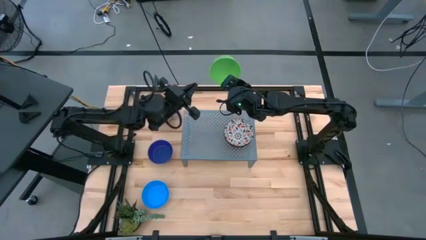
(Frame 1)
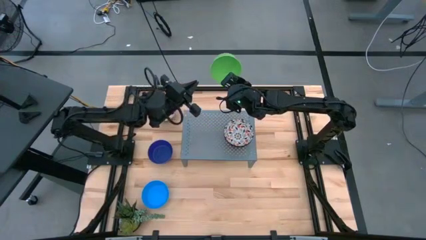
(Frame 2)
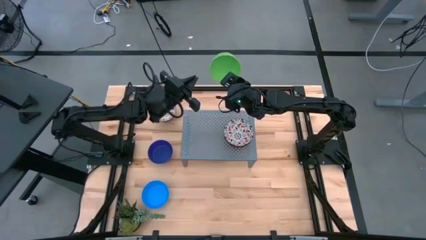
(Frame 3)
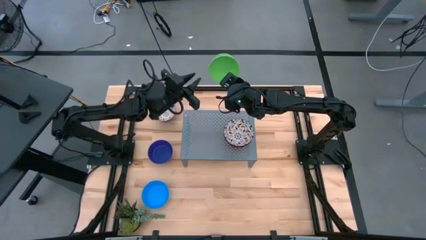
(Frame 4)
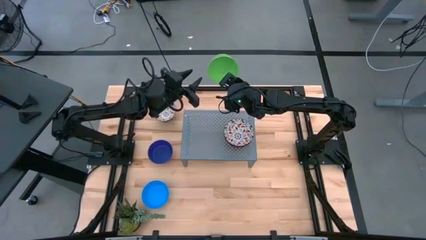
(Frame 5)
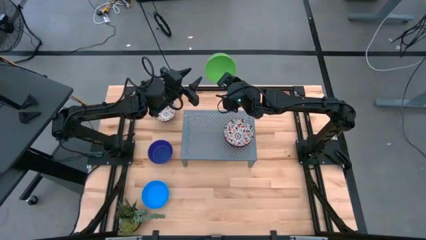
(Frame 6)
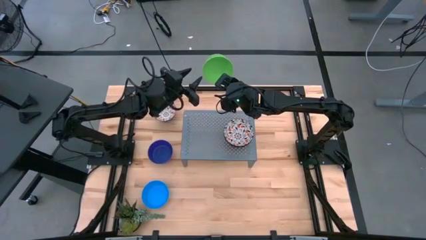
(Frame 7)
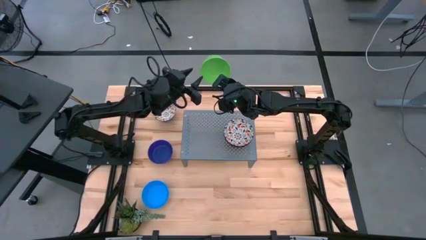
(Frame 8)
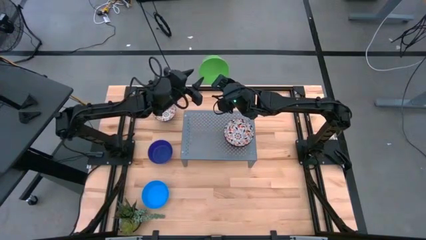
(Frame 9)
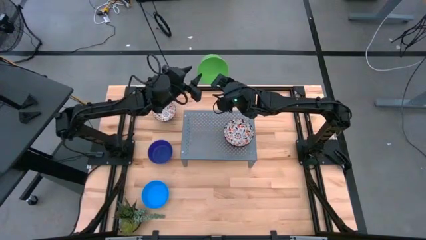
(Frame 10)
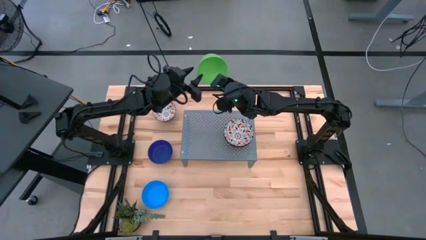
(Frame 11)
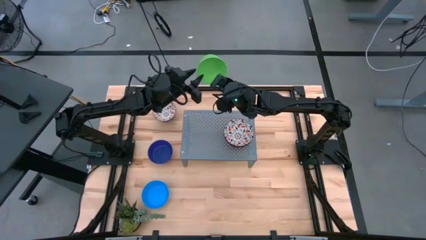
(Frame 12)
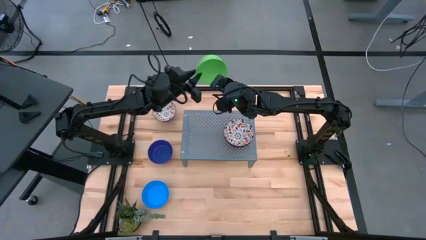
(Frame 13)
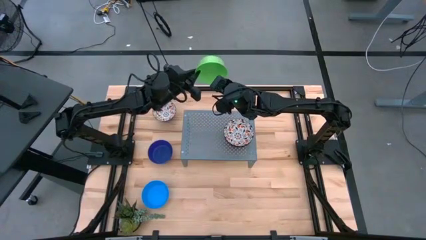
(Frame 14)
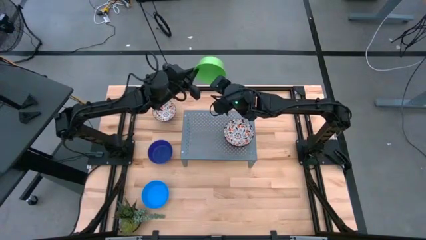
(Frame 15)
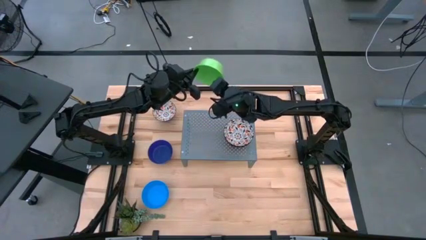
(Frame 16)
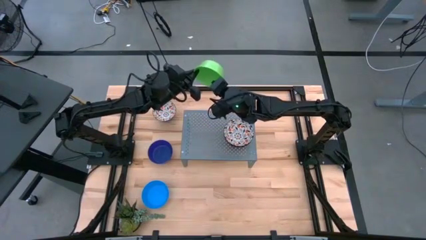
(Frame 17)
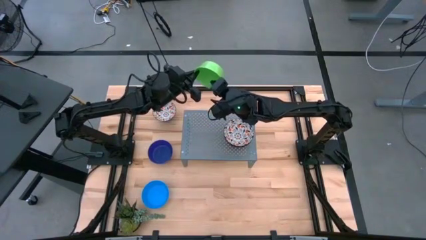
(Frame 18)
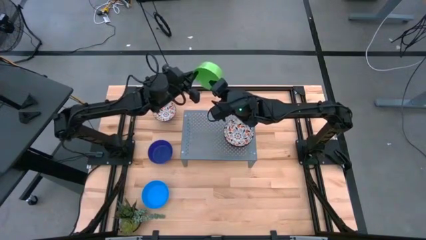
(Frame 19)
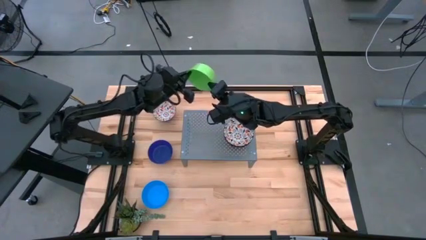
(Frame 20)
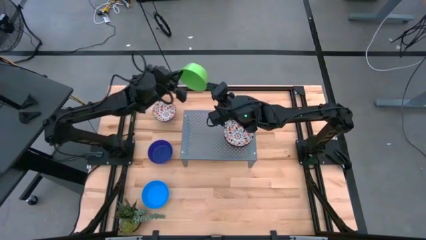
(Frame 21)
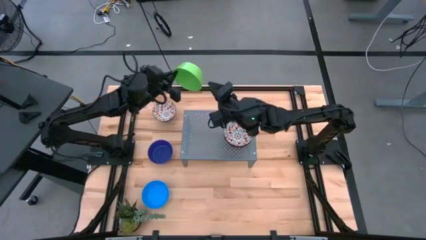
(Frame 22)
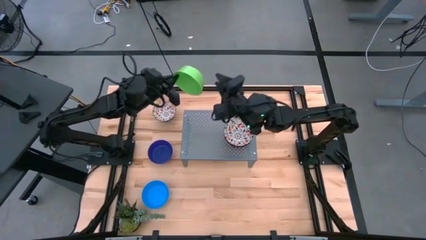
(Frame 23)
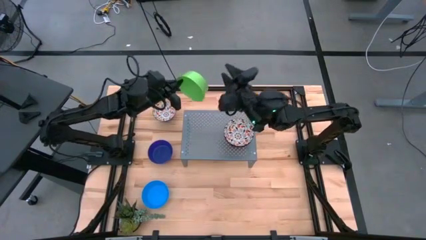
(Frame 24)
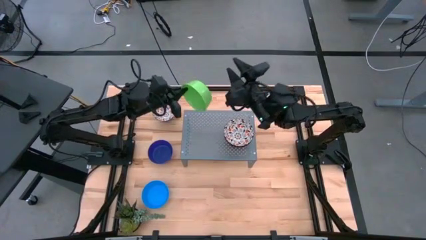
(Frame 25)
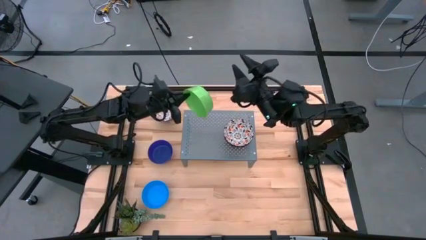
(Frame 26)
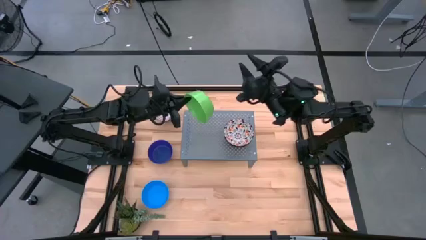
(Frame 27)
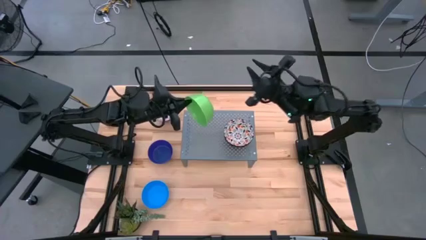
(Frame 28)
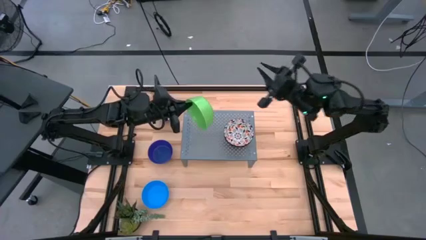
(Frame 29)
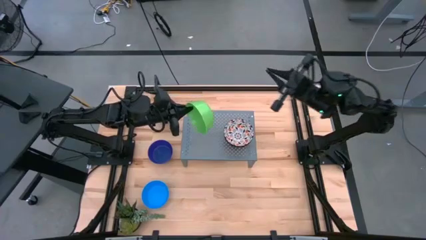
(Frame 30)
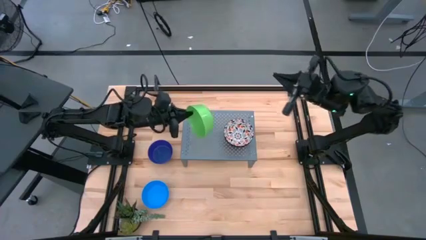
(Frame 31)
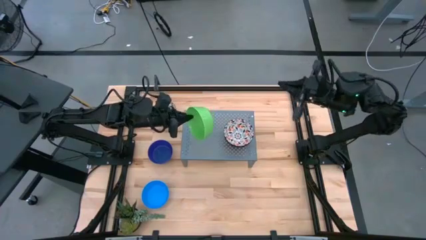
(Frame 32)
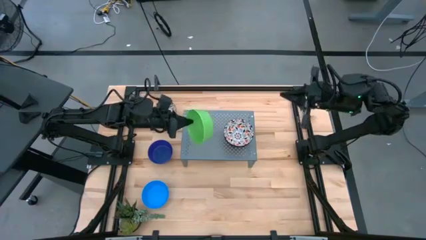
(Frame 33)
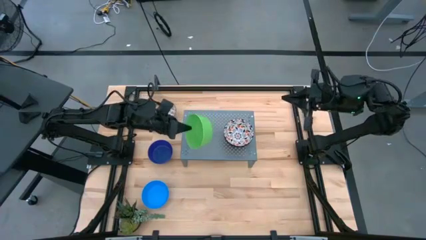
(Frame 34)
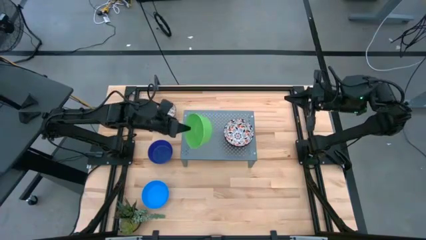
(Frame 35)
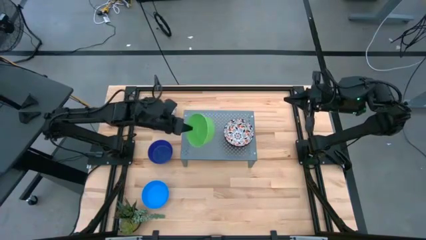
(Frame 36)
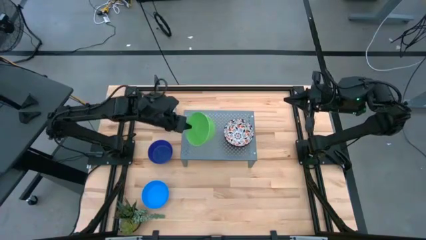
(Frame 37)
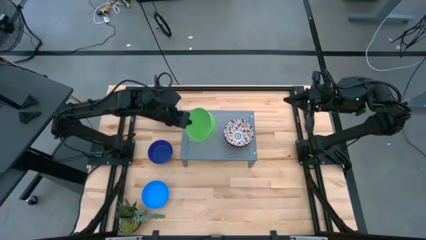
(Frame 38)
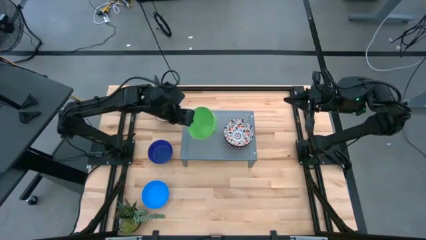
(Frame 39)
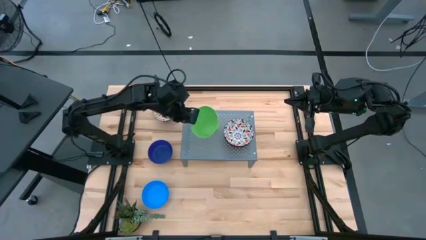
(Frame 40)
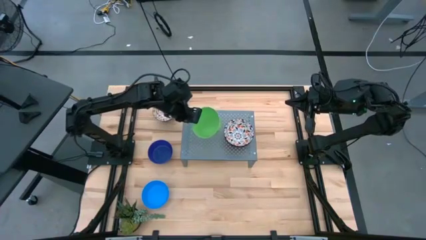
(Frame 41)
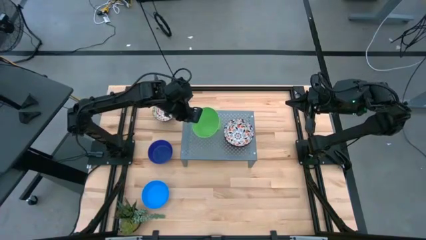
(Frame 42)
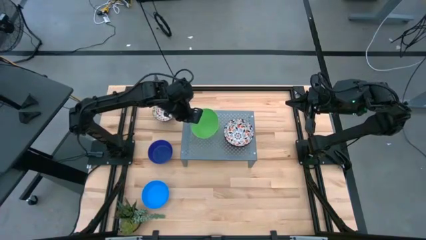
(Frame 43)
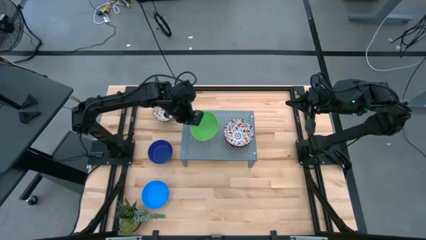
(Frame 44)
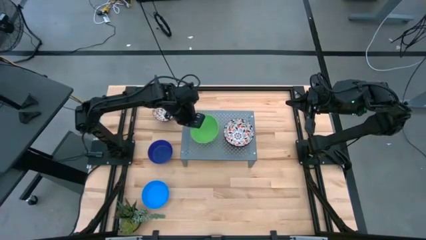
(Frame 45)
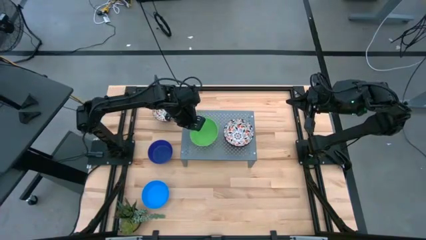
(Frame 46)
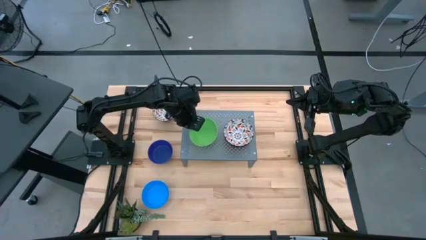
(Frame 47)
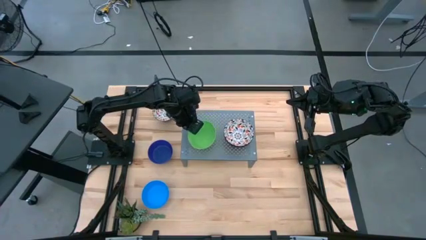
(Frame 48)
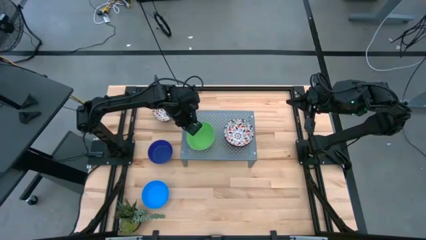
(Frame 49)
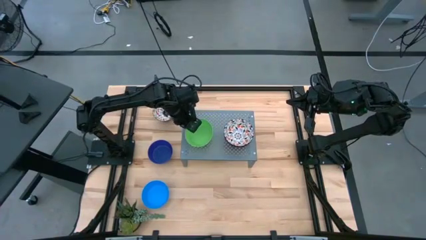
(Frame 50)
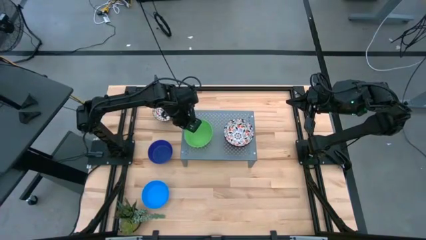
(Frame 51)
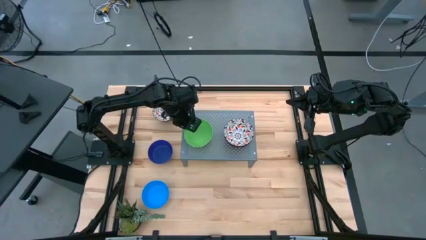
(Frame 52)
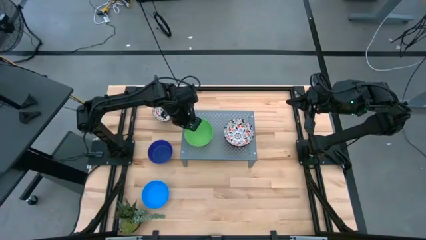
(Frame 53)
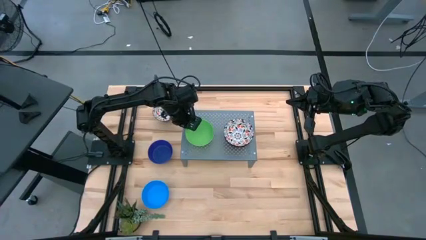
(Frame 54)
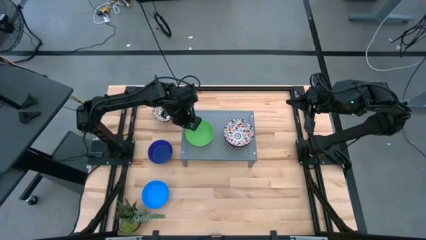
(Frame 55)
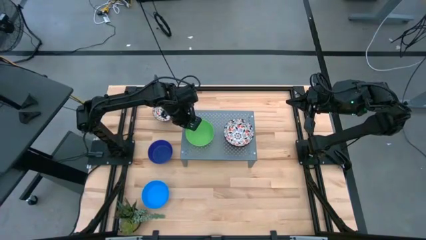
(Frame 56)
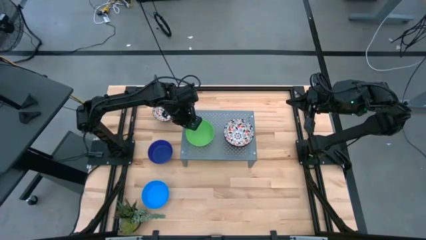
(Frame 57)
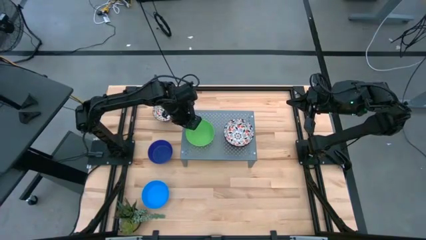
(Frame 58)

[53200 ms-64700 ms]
Task: Pick & Place Mini bowls
Put the green bowl on the shelf

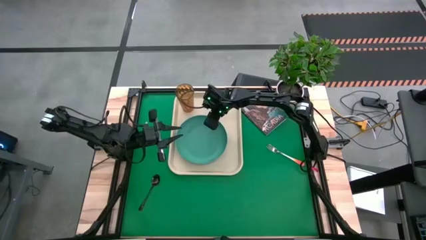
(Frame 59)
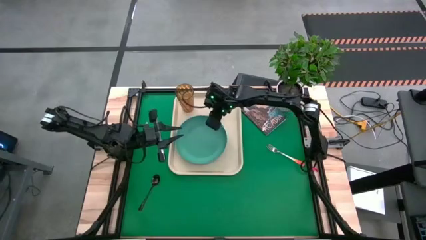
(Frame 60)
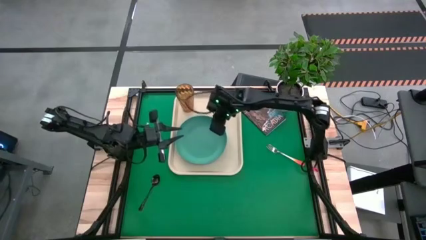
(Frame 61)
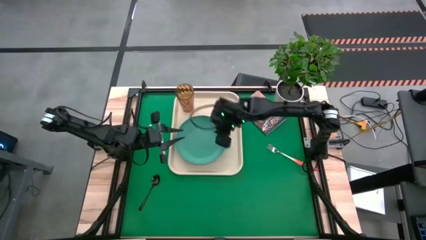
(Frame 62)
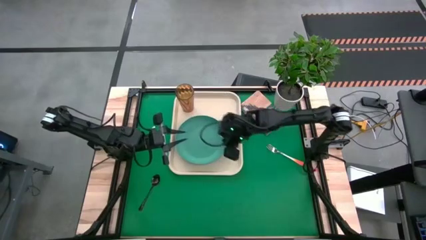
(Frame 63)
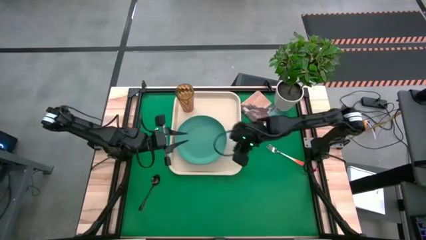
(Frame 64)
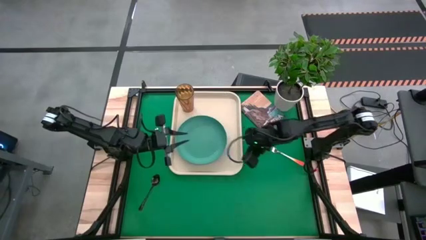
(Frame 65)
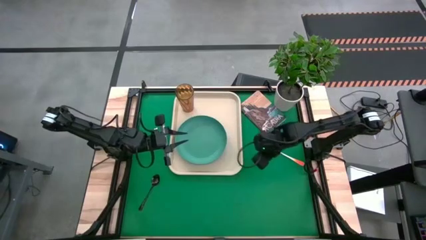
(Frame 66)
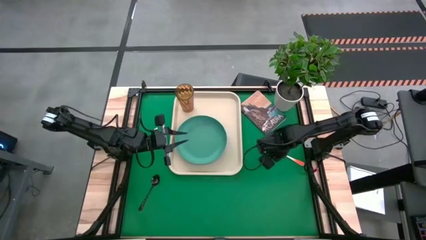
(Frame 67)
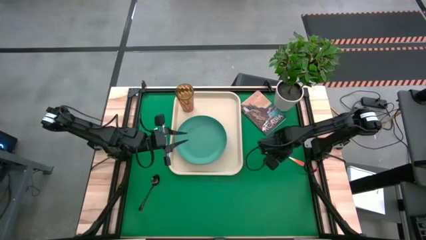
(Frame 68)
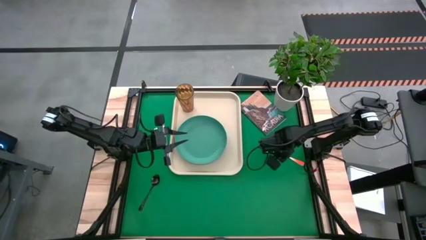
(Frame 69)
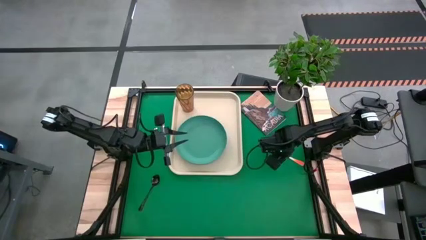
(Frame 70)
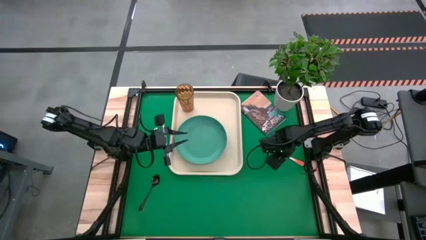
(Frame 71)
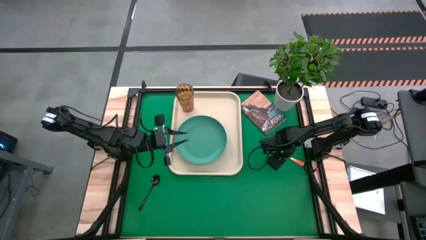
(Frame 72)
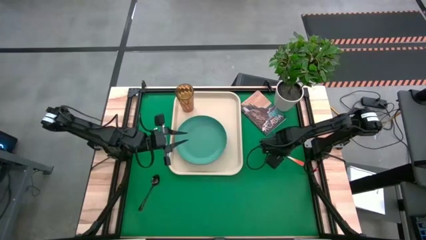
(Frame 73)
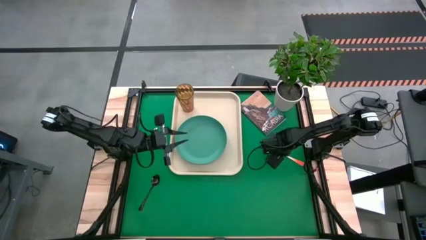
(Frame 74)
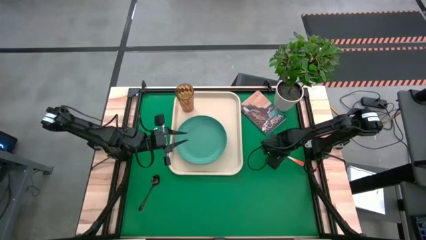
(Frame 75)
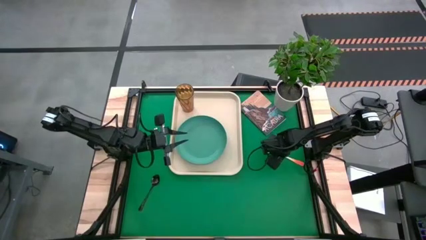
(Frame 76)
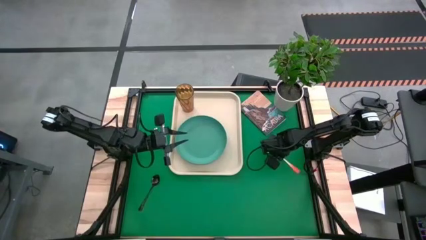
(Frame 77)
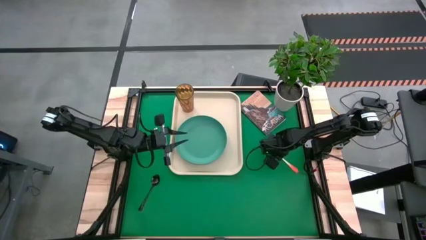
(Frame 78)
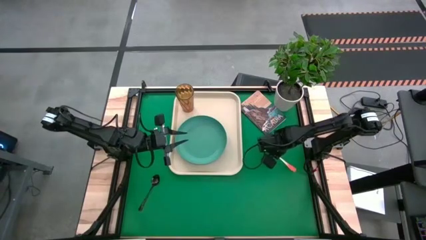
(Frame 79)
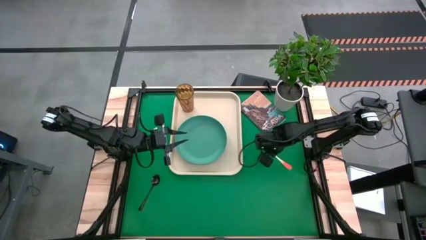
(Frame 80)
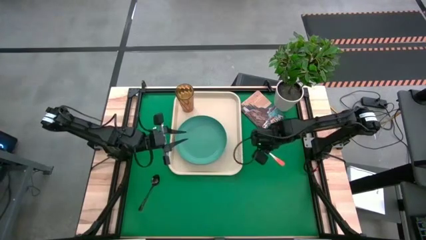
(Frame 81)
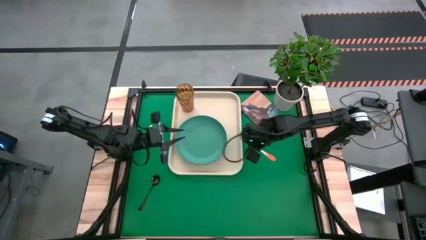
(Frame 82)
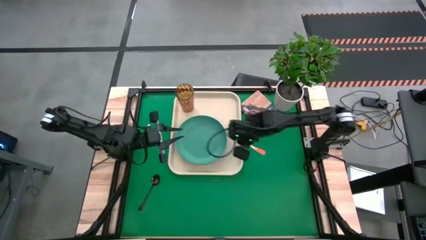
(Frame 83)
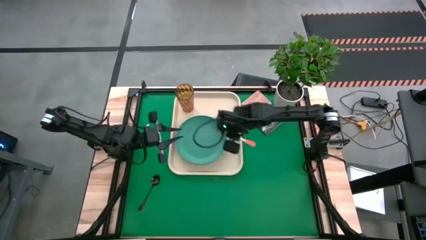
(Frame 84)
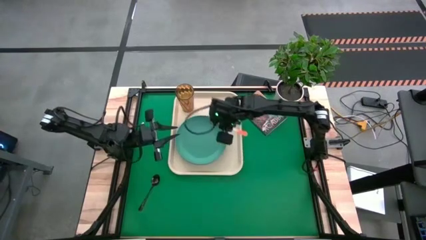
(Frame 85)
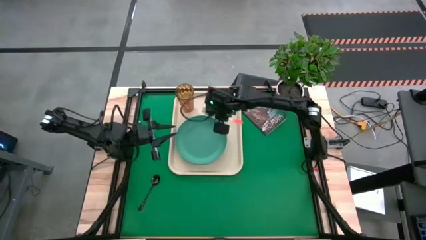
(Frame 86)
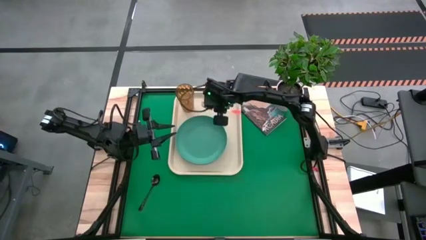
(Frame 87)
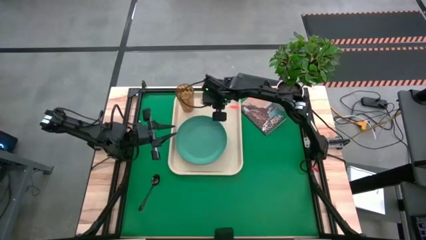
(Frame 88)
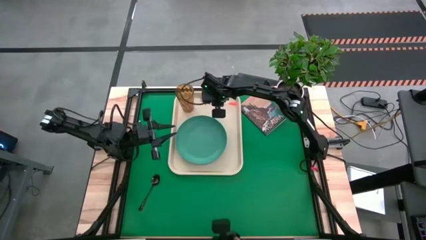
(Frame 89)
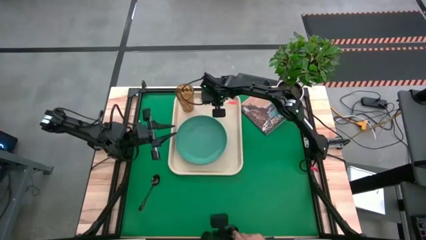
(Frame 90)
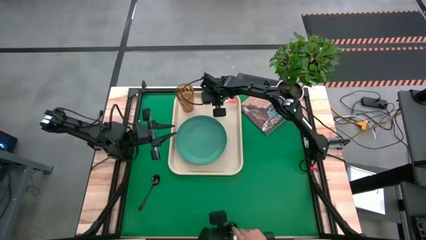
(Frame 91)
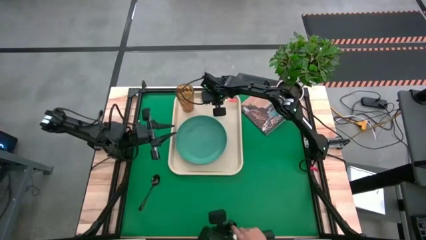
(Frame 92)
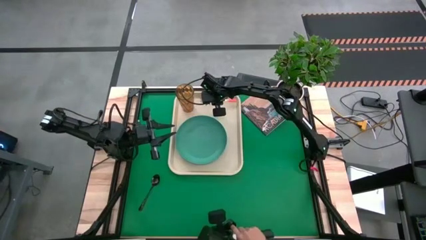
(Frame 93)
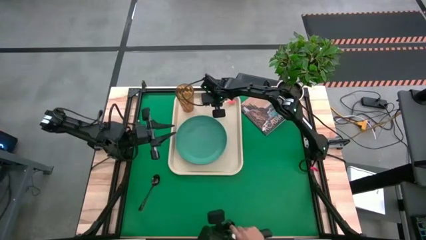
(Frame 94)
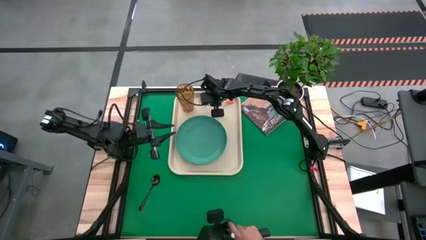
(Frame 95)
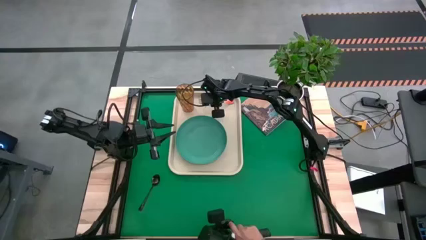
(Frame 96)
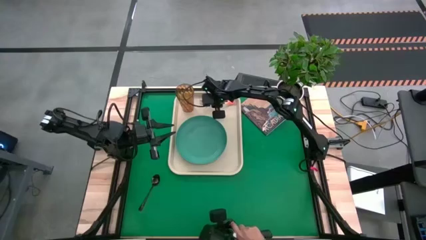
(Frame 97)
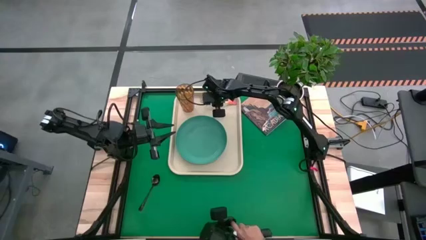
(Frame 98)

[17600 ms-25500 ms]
Task: Pick and place plate/cup/fork/spoon on tray
Put the orange fork on the white tray to the right of the orange cup
